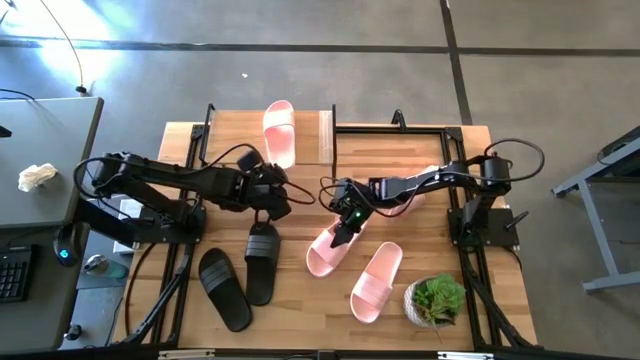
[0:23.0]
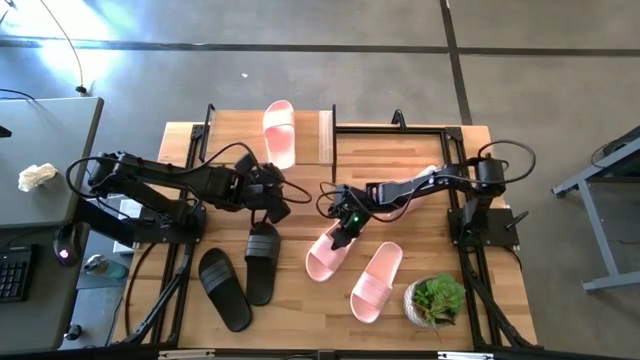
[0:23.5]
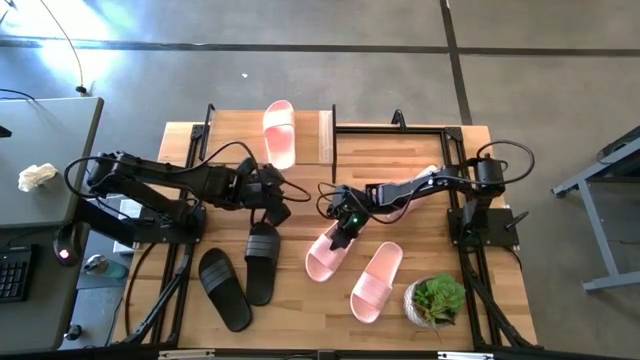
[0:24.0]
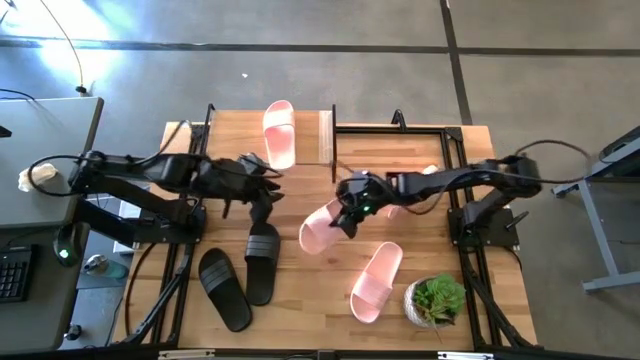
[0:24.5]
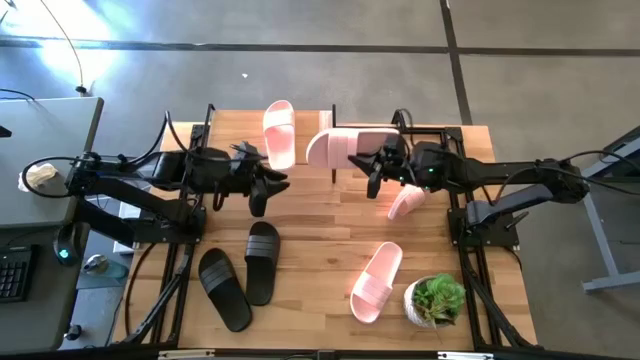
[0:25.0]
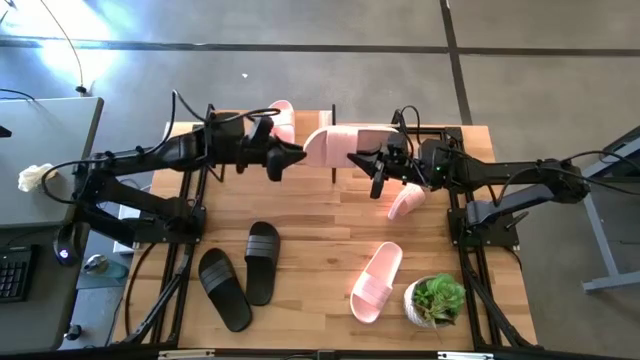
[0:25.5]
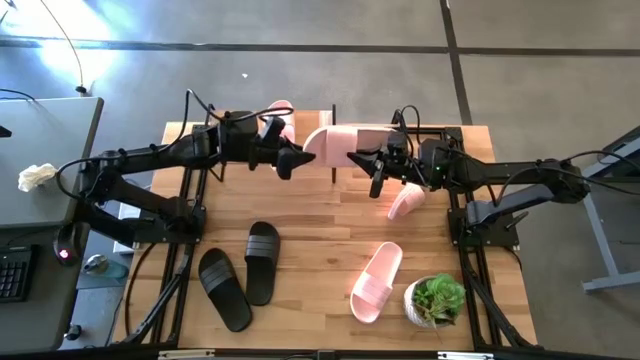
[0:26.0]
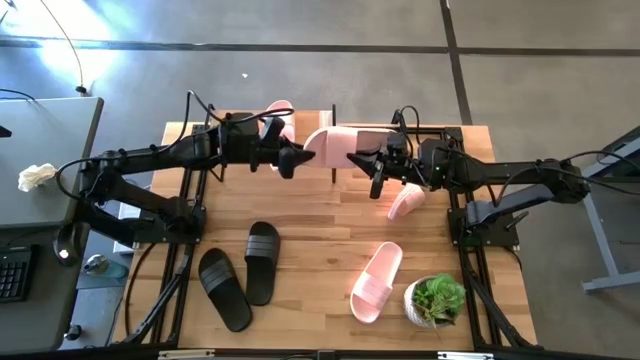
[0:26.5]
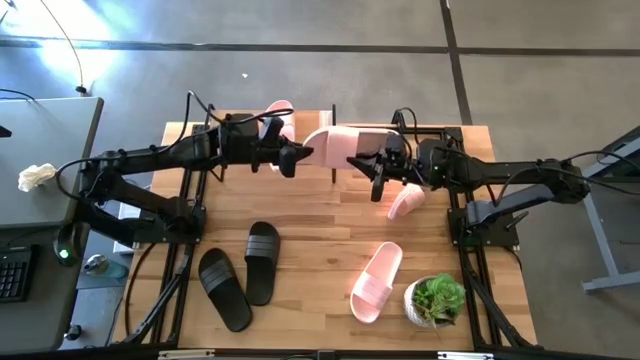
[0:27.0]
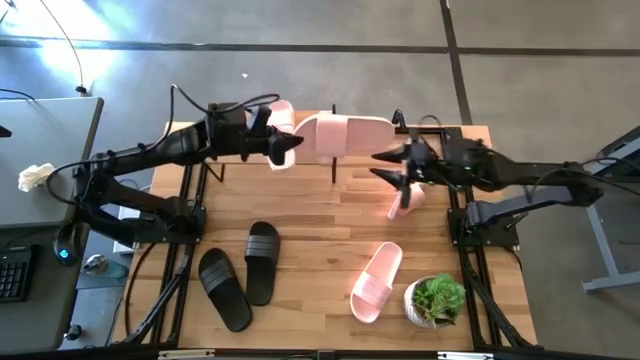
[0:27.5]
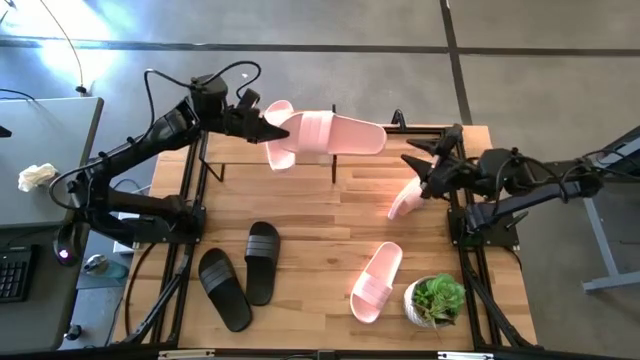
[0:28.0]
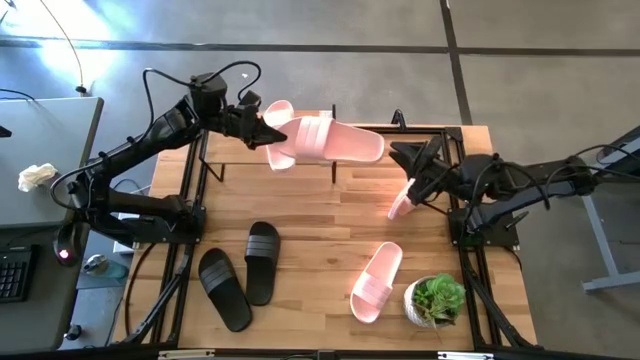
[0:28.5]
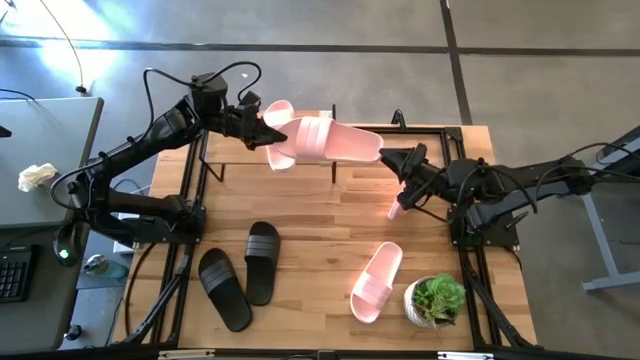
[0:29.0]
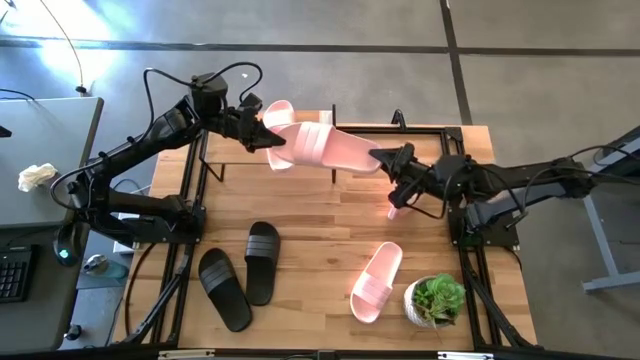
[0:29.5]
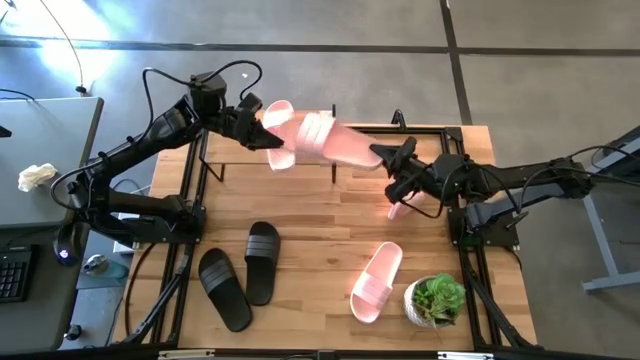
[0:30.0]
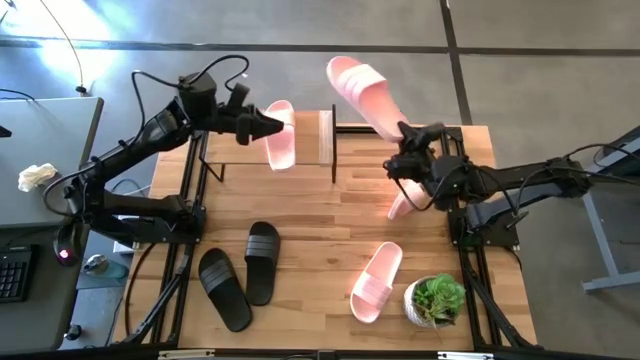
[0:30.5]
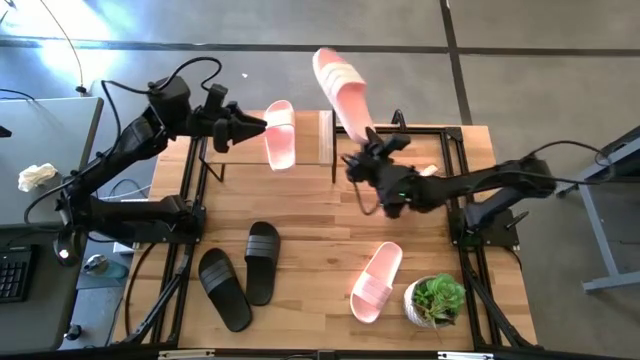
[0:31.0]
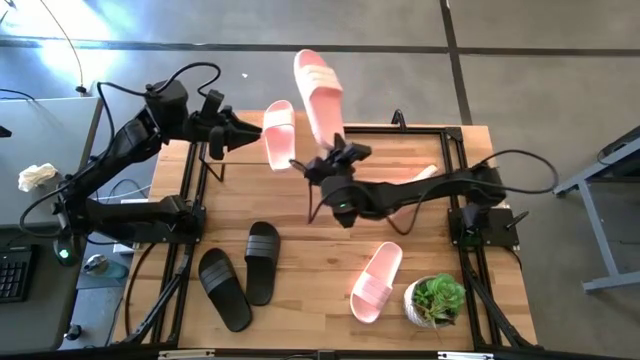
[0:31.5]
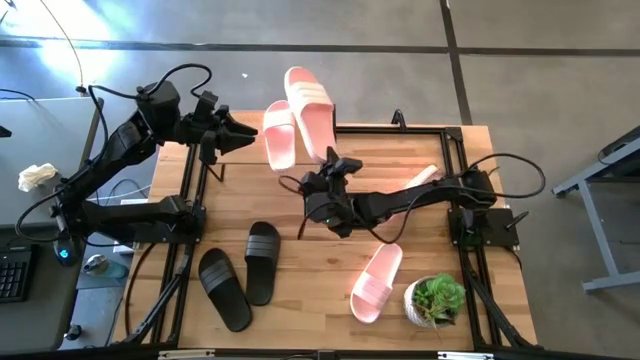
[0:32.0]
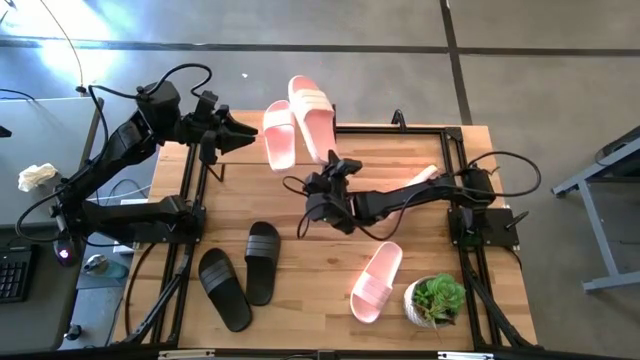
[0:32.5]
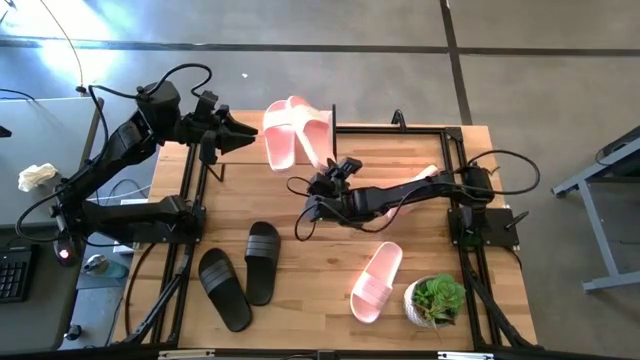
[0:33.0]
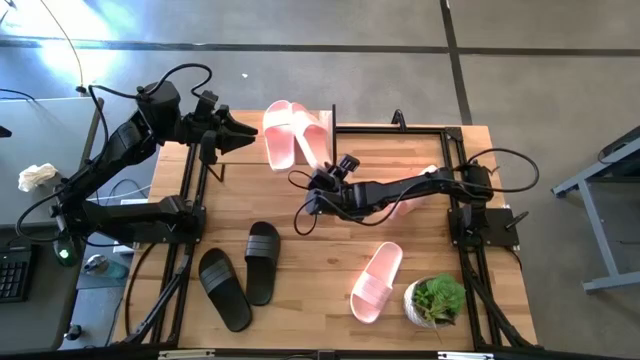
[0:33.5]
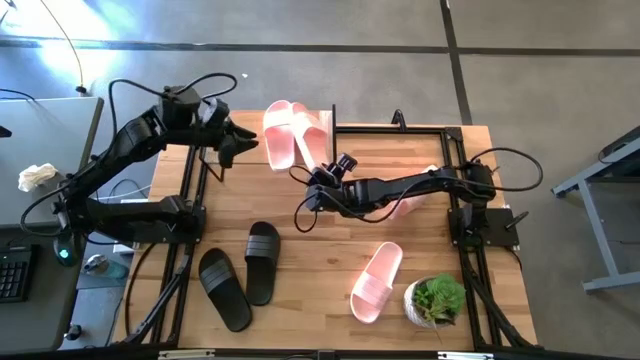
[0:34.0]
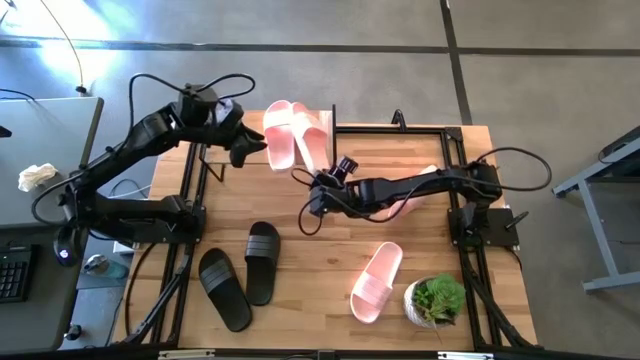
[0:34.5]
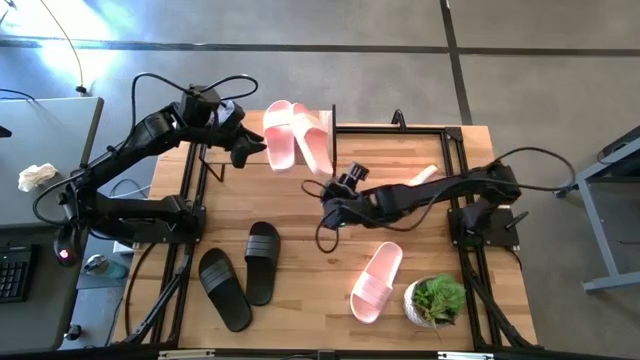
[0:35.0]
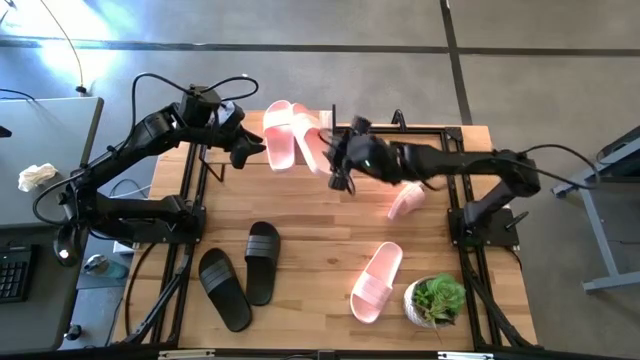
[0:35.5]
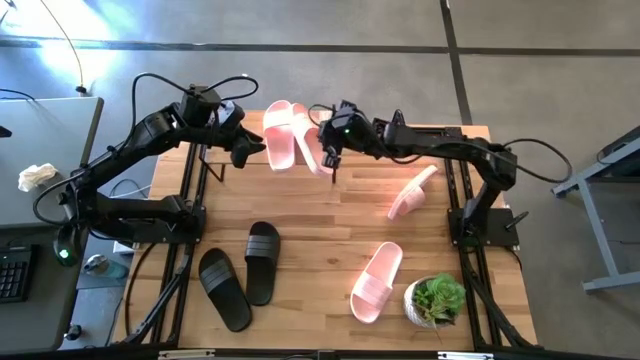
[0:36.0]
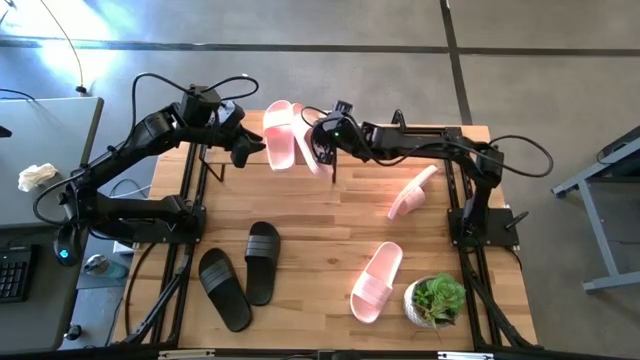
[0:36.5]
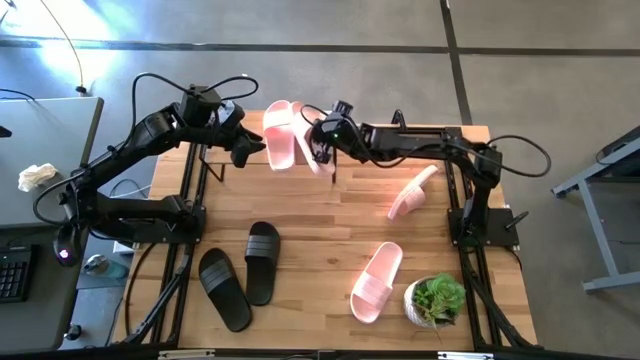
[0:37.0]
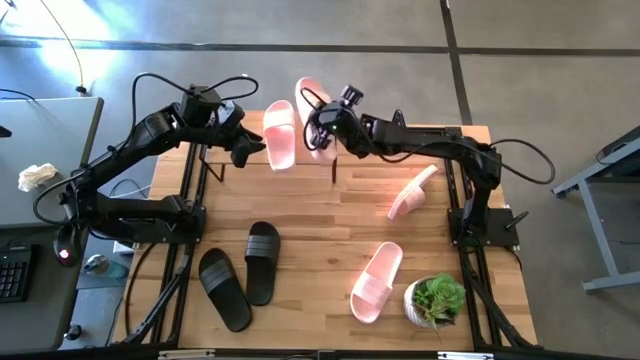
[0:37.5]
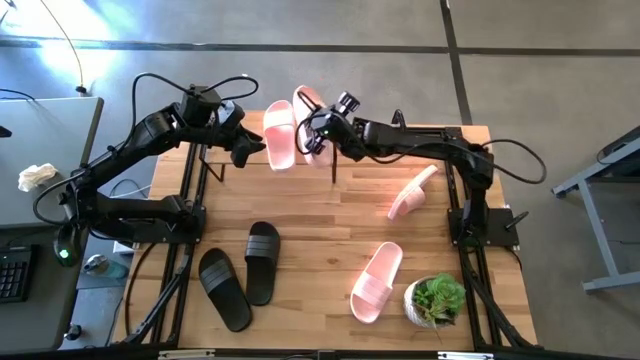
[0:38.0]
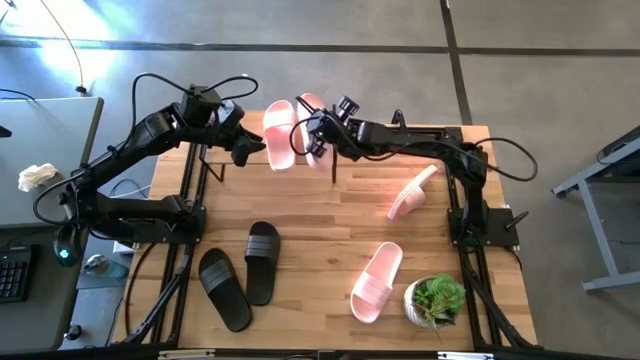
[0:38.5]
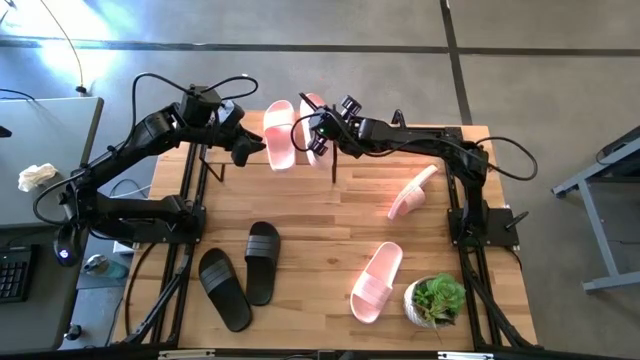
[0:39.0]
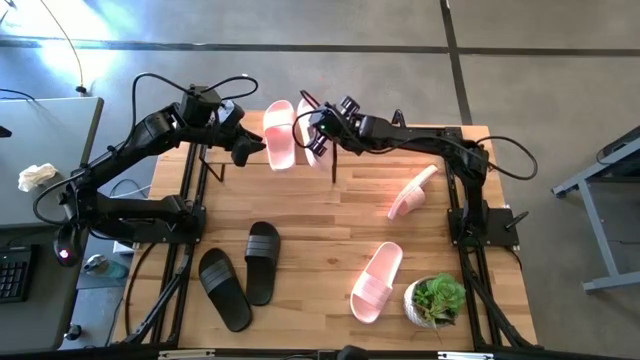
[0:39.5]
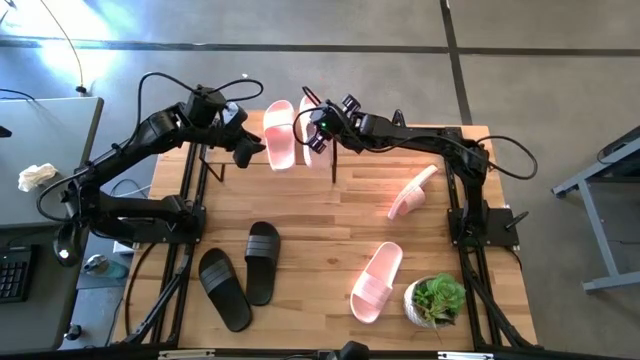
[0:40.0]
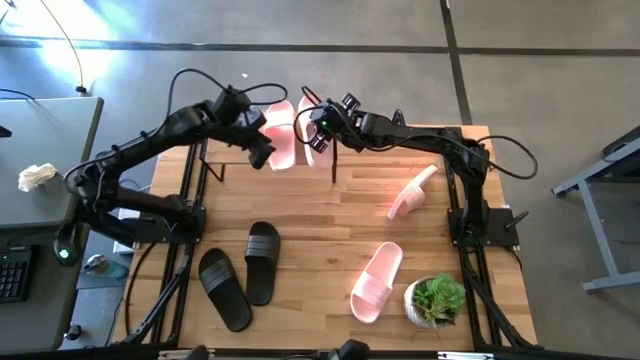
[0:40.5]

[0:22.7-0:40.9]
Task: Pick and place slides into the shelf
Put the pink slide on the shelf

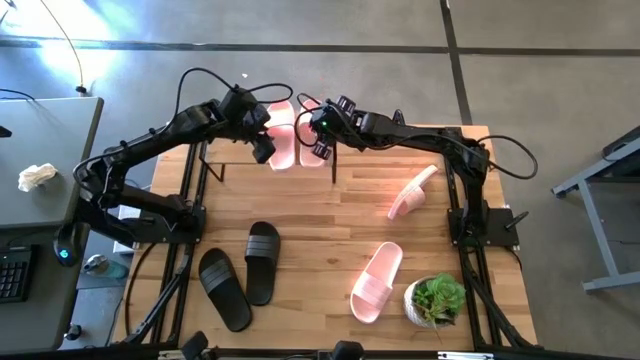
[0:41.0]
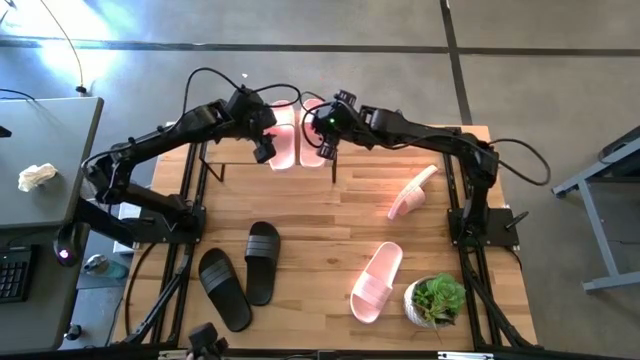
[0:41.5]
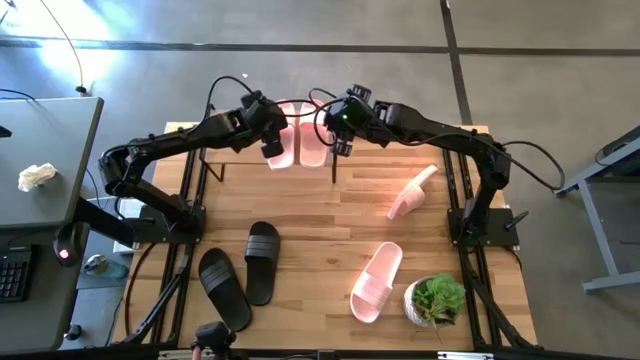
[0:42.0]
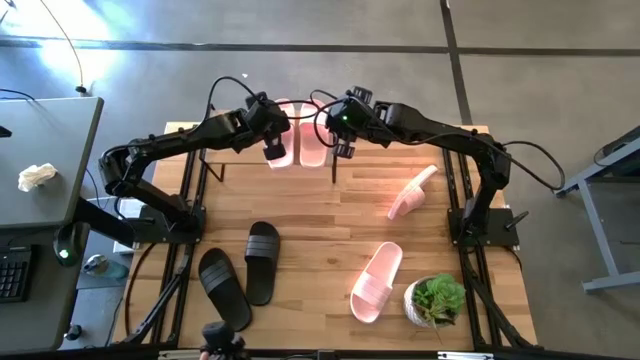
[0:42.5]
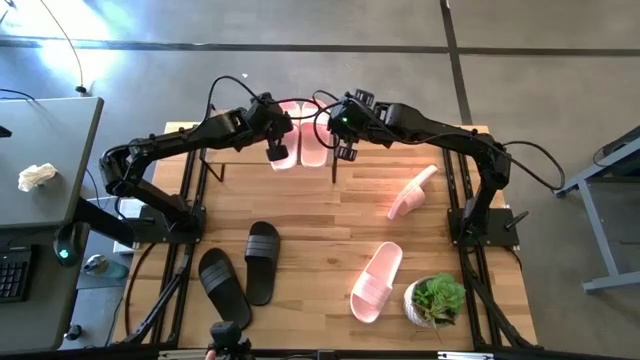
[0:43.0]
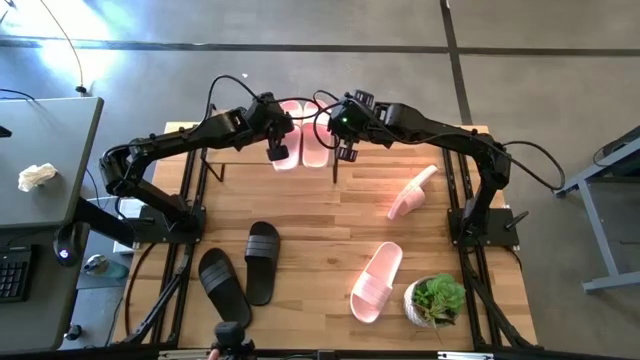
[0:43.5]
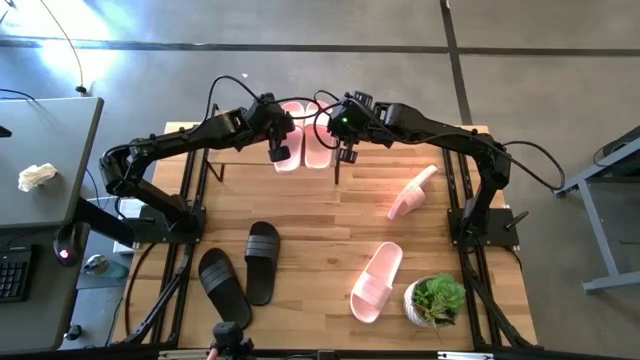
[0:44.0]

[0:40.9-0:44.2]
Adjust the slides on the shelf

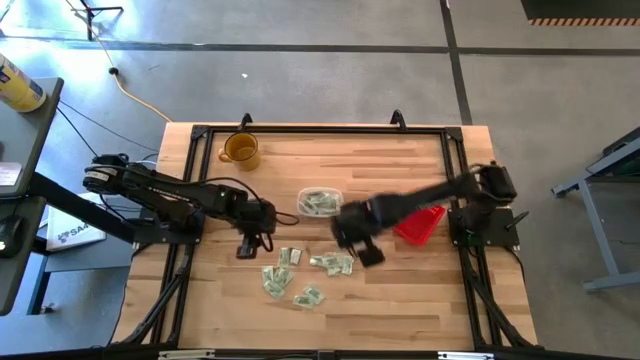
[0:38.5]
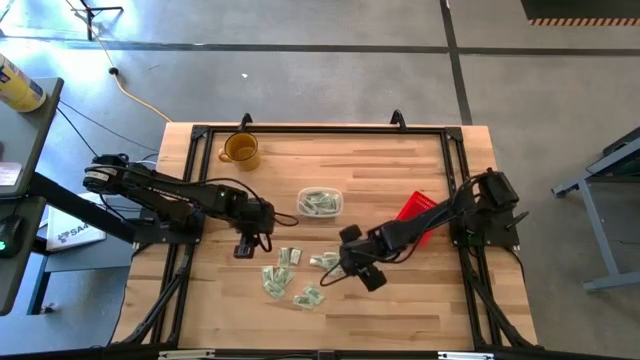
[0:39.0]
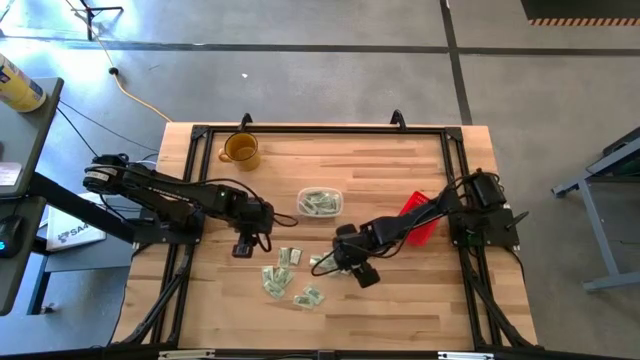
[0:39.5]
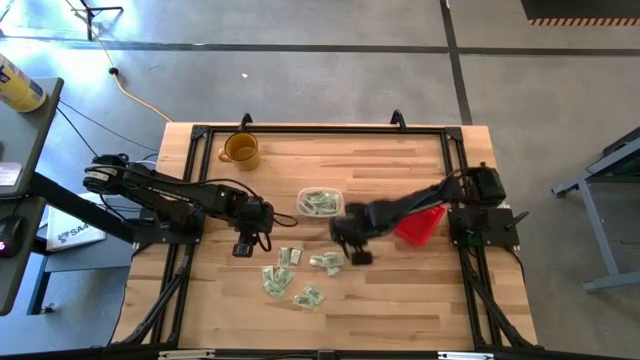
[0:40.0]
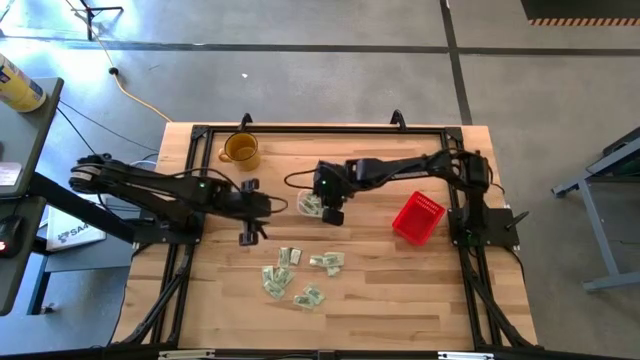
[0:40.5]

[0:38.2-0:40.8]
Task: Pick and place items into bin
Put the white stevia packet into the transparent bin
